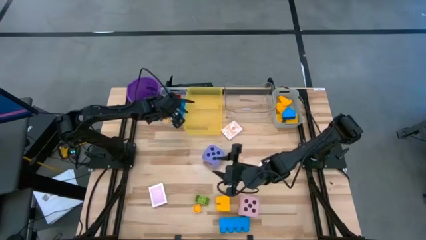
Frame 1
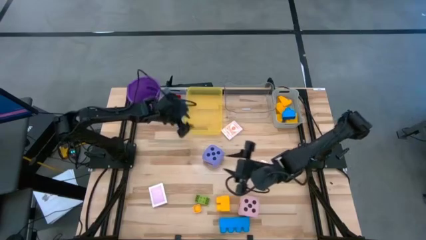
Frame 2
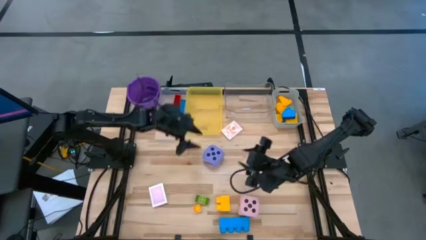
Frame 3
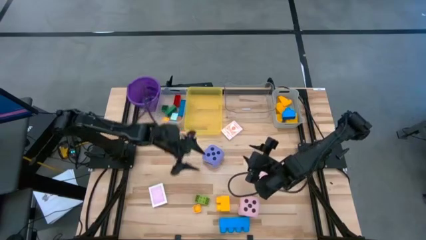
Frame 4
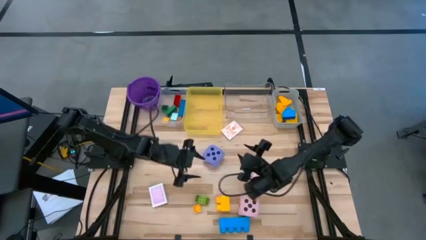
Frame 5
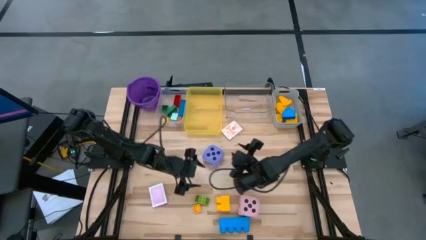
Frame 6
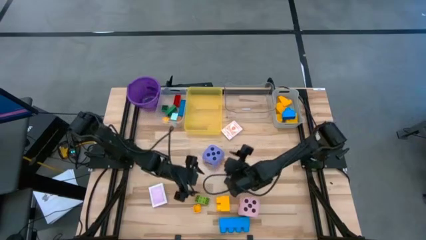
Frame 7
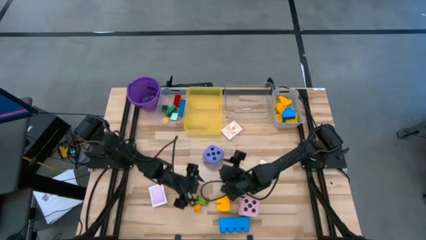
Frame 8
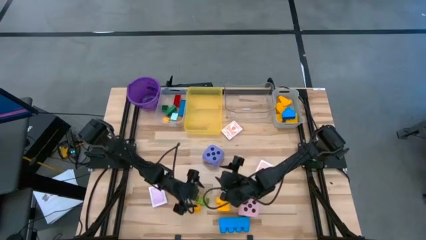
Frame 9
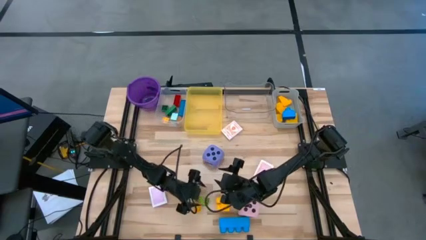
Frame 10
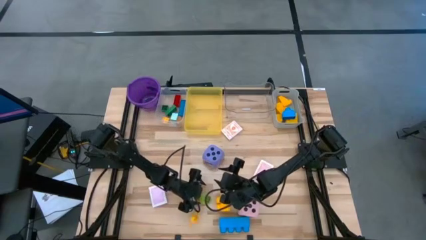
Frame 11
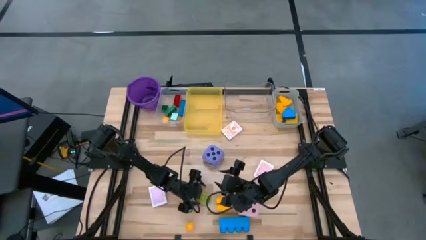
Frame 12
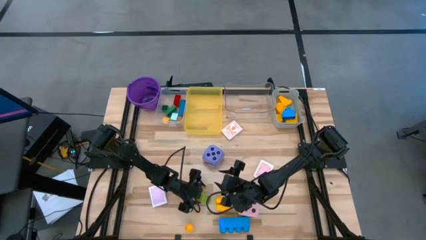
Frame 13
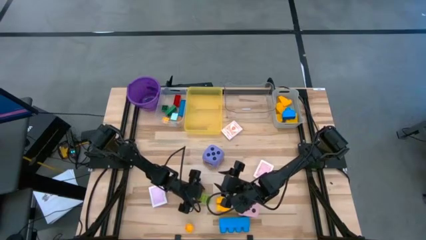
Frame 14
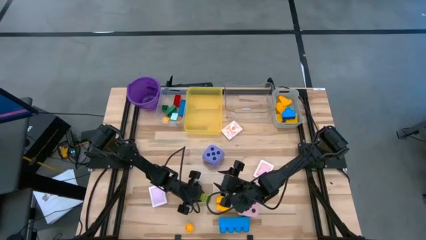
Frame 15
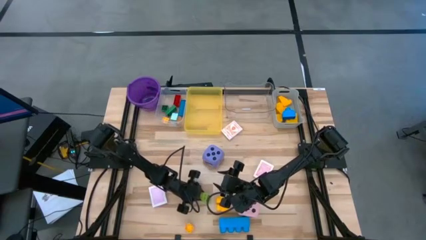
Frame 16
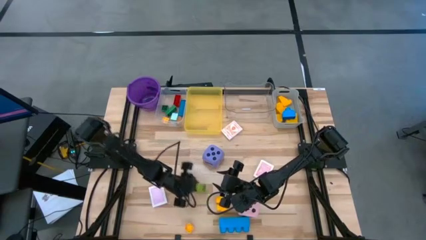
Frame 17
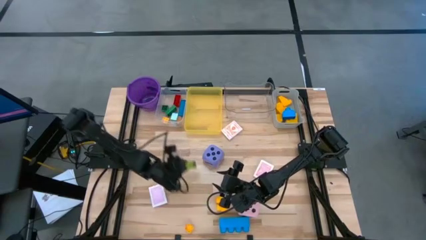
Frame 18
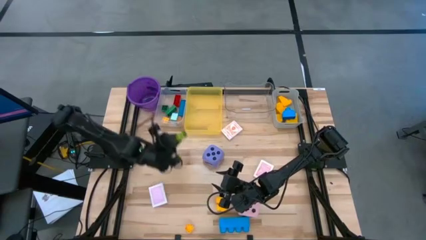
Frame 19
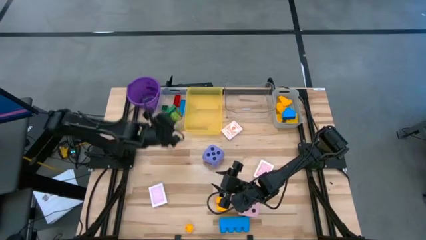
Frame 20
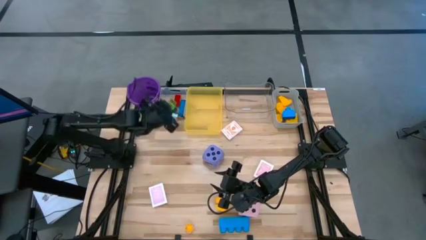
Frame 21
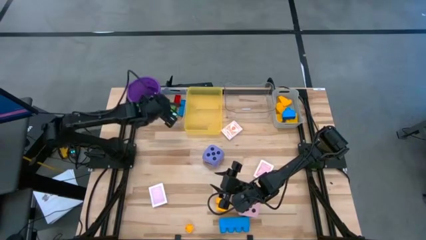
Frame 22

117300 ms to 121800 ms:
Task: Pick & Place Toys
Put the small light green game piece into the white bin

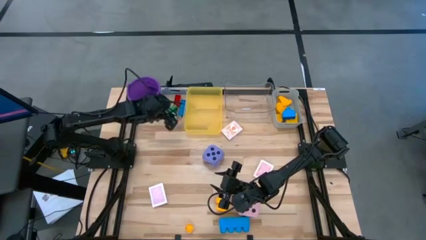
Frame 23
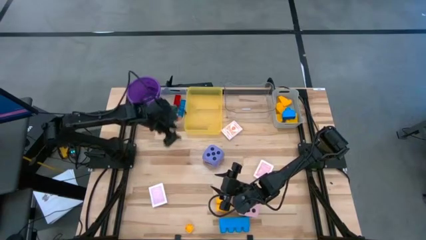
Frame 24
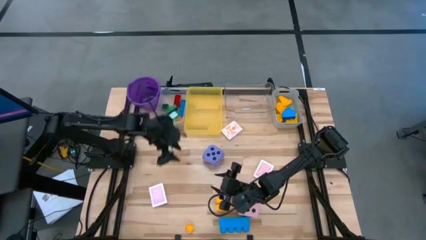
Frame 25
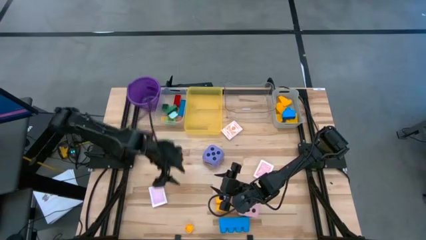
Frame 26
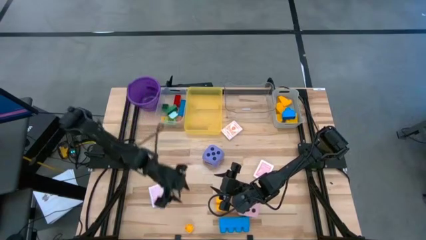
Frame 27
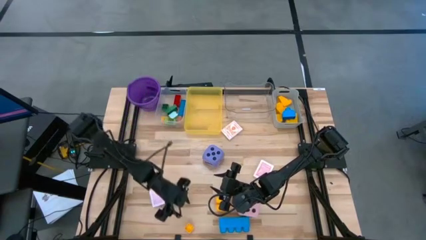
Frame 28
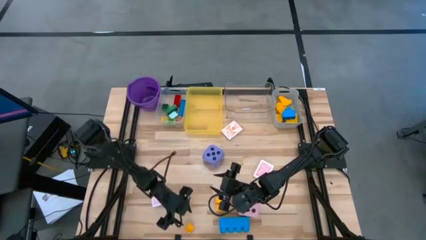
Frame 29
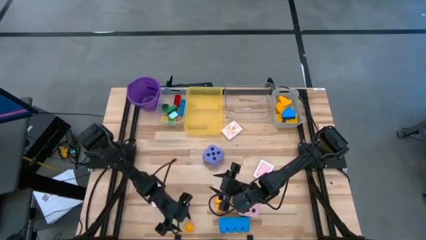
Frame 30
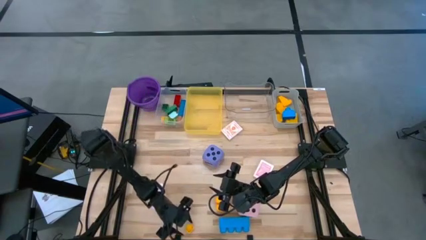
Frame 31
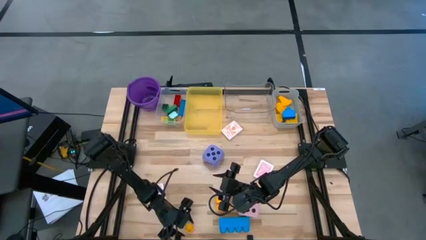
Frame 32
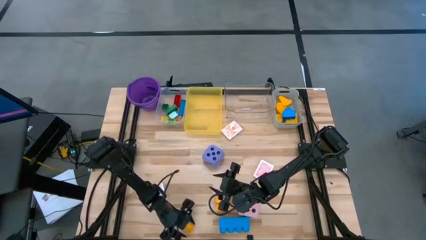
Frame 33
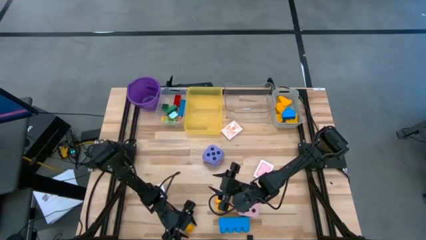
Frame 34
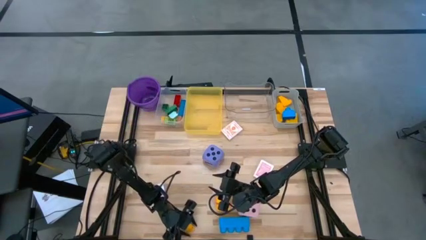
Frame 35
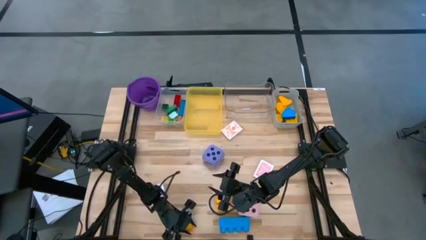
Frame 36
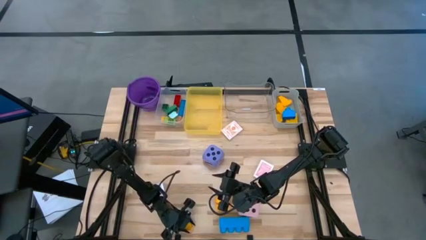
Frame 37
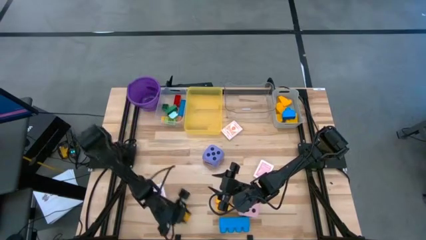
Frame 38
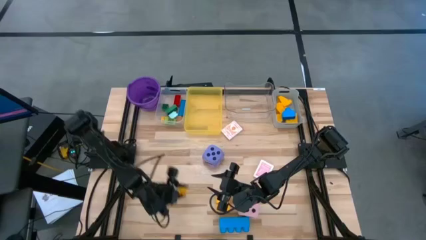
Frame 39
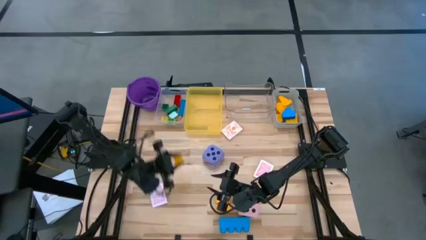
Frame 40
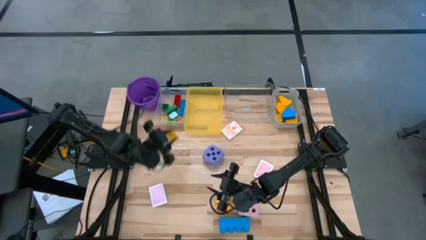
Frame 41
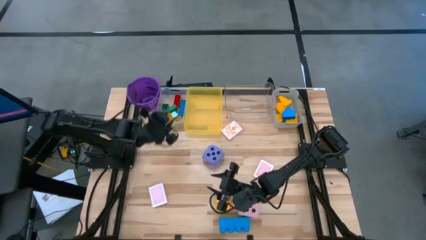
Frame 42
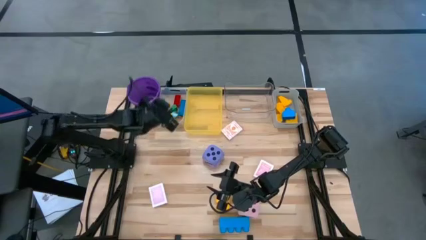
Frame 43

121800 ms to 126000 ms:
Put the small yellow game piece into the white bin

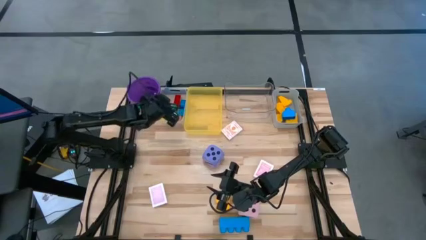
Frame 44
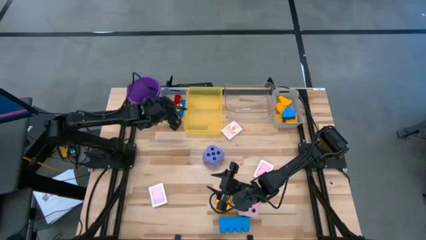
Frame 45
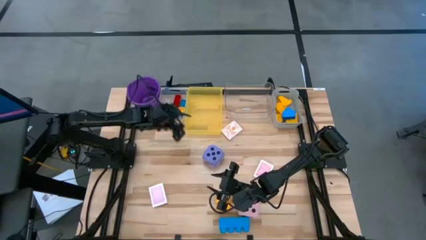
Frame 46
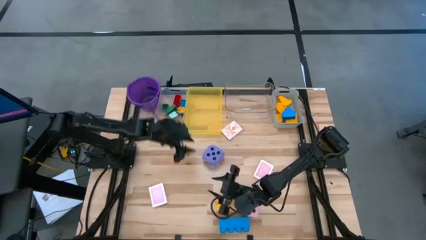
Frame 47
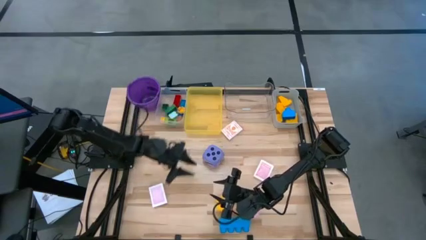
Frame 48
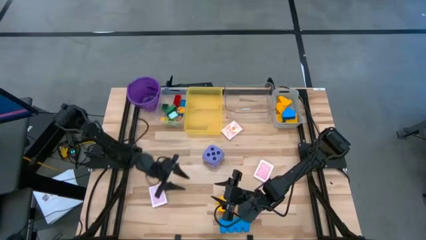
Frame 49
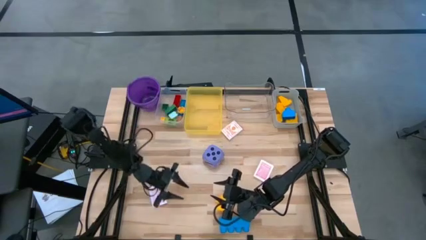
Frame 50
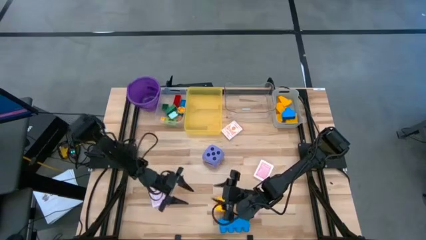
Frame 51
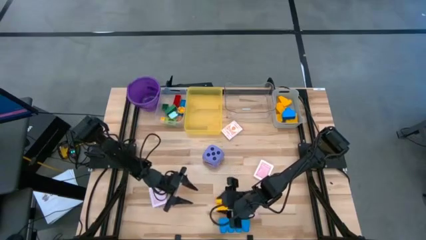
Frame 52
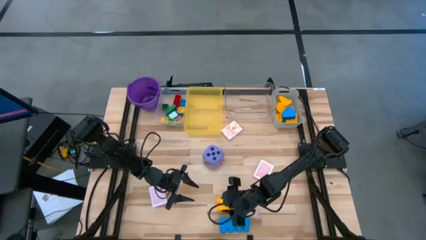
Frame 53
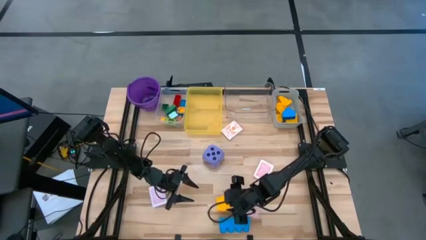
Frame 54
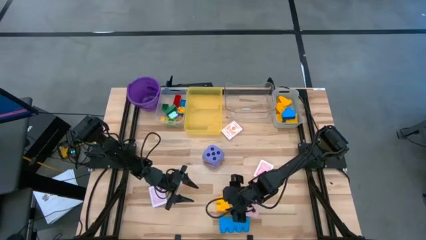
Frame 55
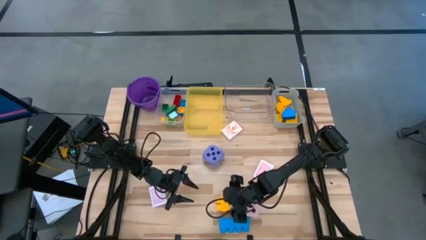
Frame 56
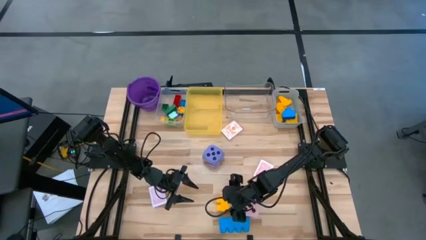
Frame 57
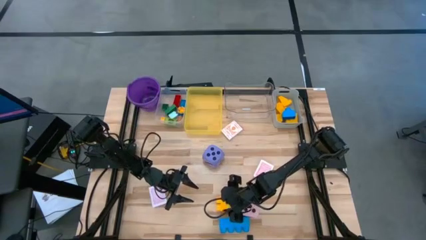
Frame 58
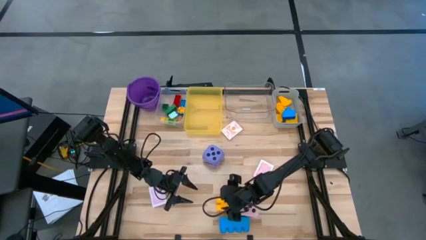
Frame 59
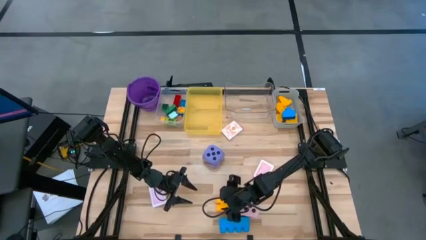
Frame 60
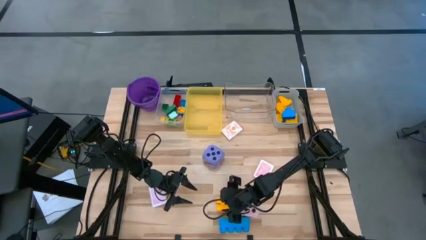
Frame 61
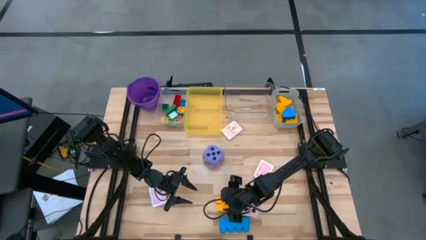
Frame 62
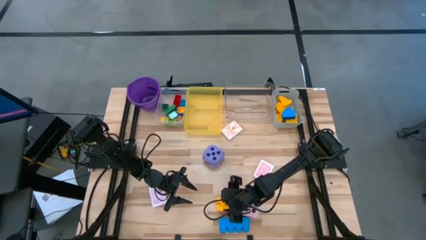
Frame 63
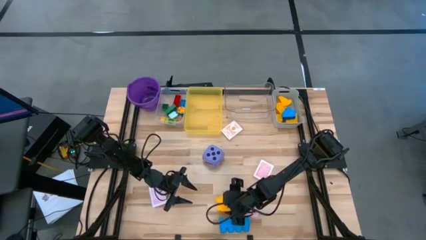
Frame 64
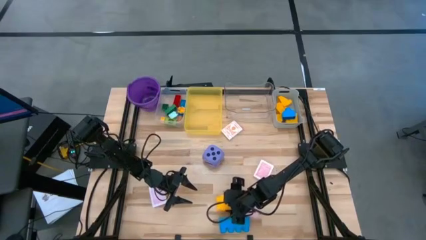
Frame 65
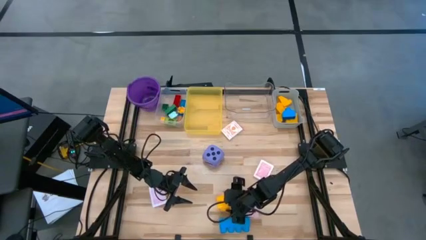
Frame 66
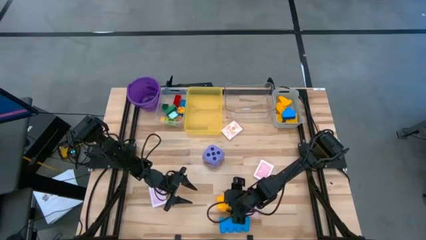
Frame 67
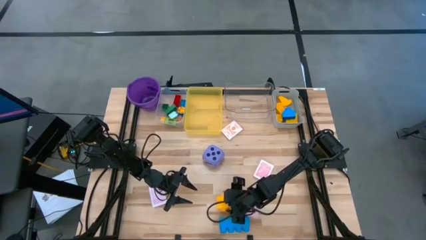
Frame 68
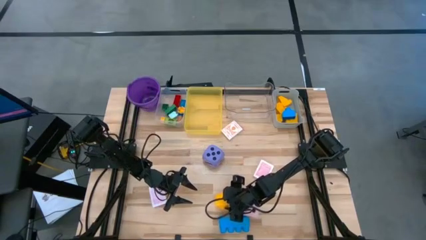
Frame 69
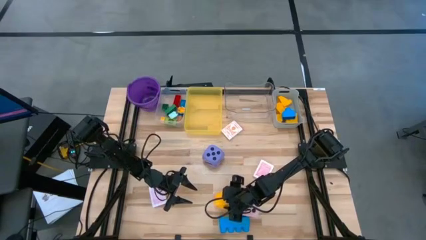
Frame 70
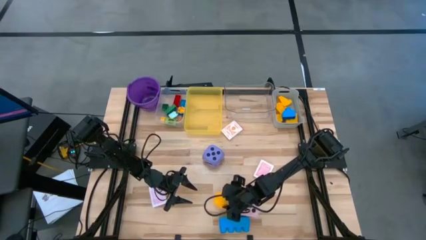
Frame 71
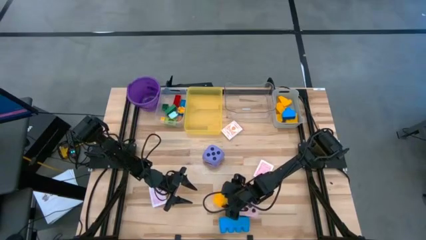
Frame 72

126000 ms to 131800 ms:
Put the large yellow game piece into the gray bin

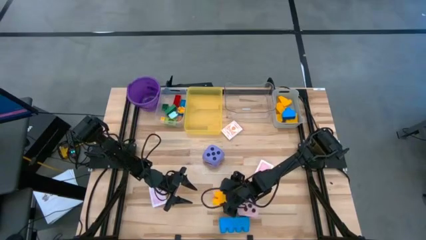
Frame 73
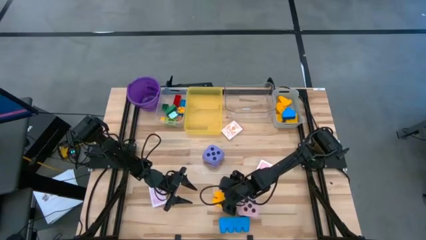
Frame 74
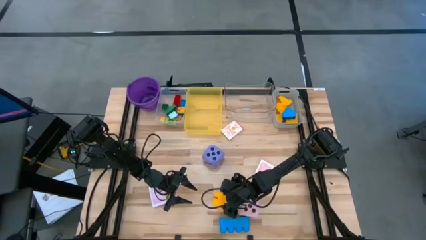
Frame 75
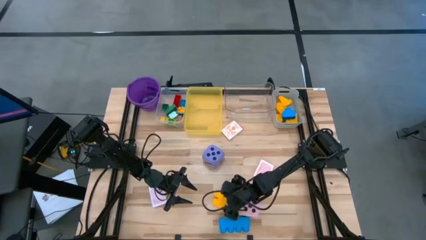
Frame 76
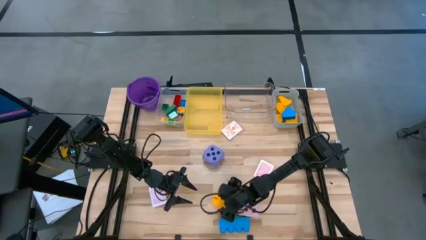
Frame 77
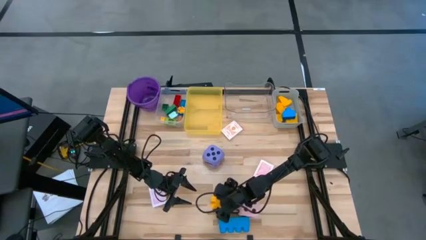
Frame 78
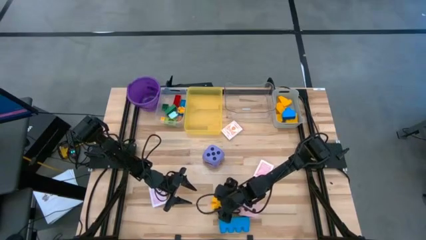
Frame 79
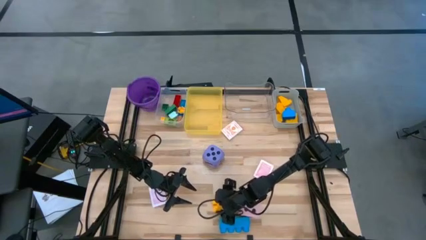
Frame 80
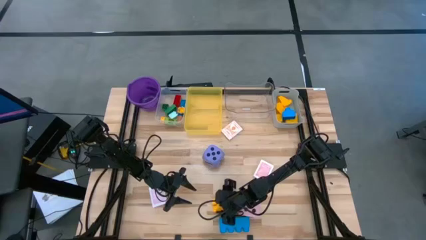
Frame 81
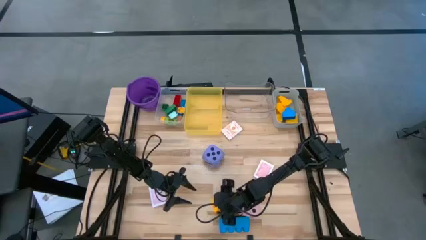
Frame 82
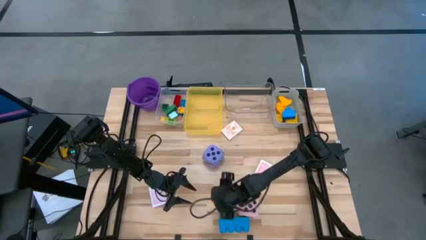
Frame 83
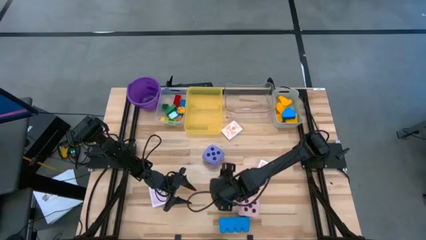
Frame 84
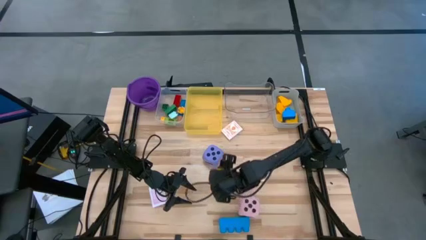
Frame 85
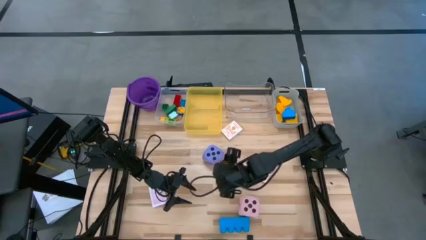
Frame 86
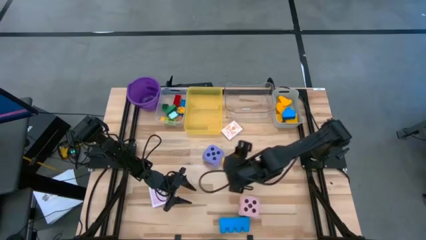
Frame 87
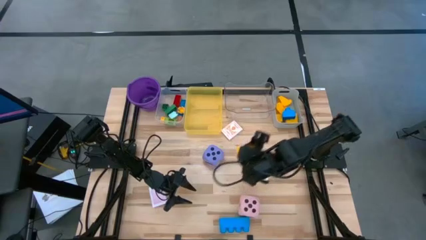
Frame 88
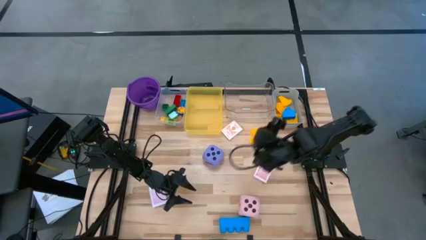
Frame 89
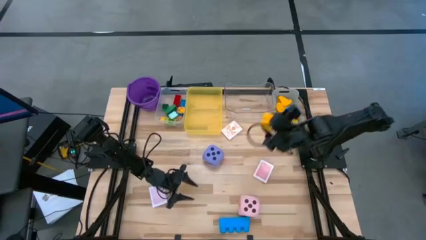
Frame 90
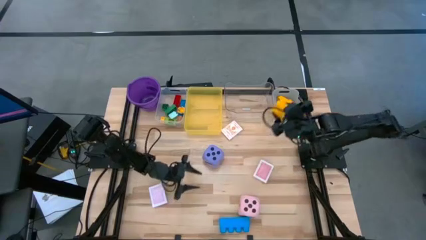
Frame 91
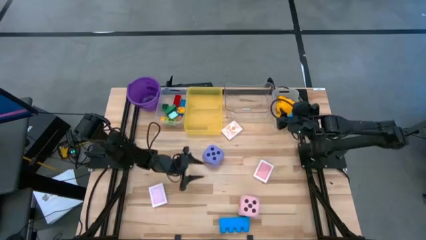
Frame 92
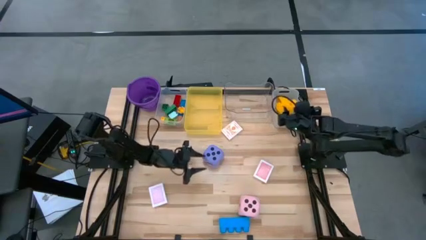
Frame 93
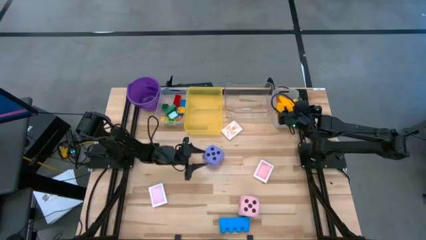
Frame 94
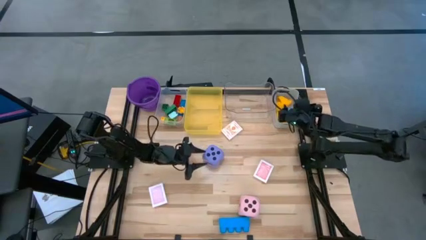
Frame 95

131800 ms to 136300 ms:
Put the large yellow game piece into the gray bin
